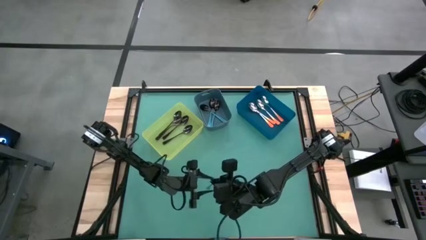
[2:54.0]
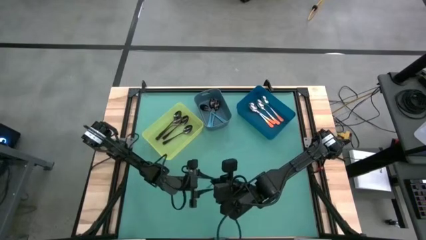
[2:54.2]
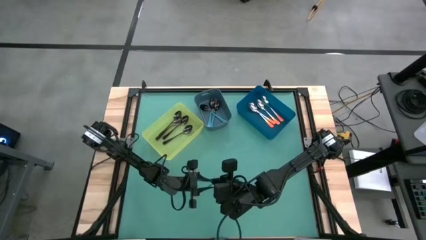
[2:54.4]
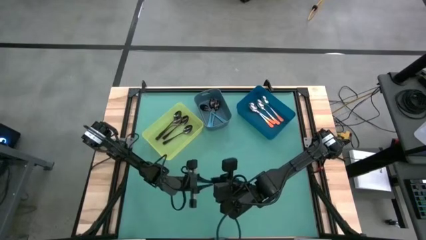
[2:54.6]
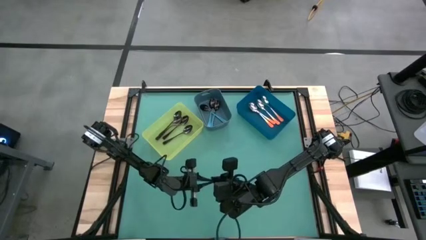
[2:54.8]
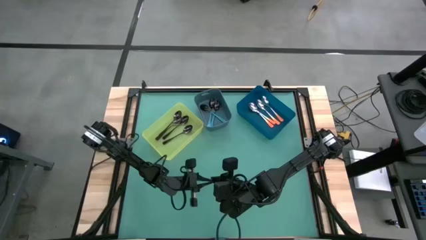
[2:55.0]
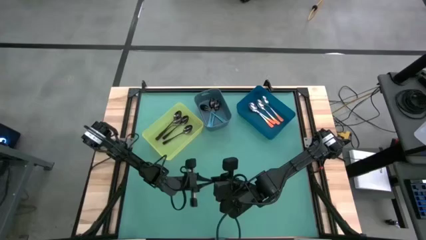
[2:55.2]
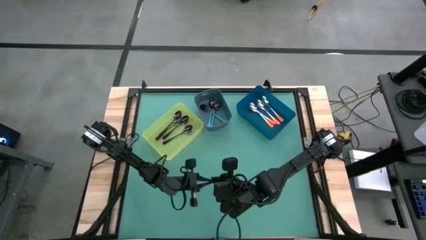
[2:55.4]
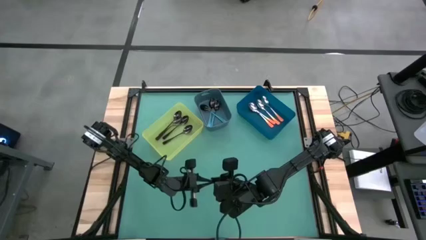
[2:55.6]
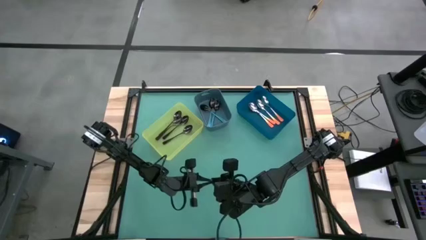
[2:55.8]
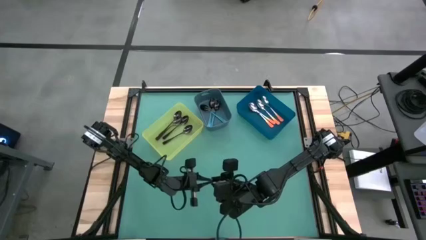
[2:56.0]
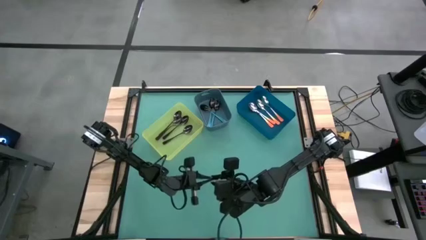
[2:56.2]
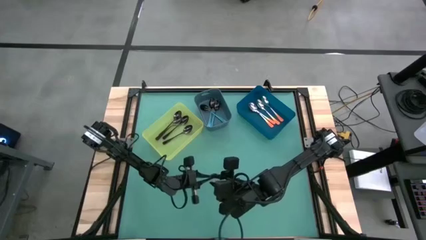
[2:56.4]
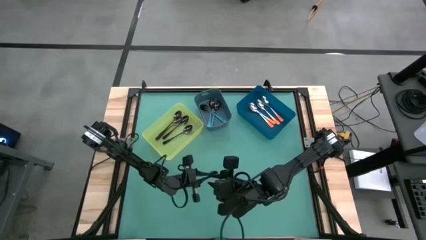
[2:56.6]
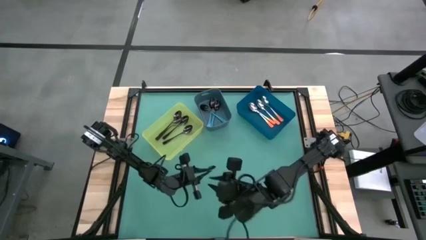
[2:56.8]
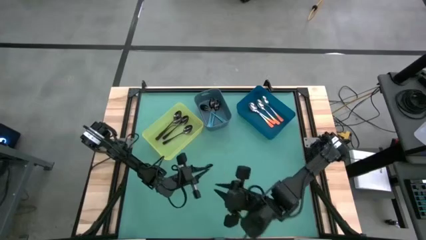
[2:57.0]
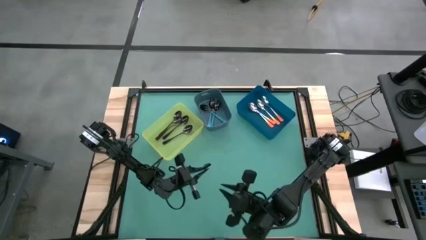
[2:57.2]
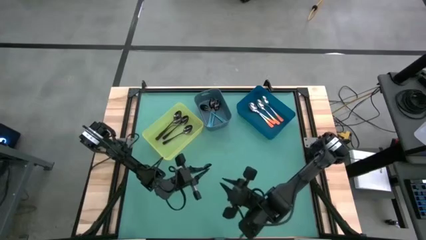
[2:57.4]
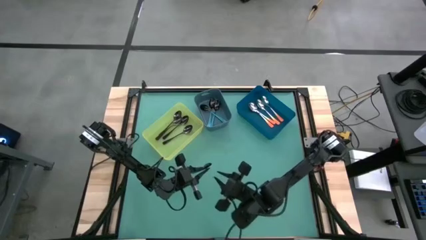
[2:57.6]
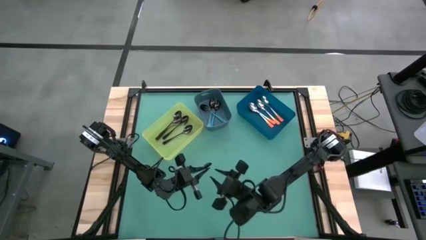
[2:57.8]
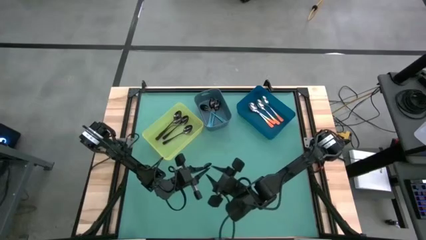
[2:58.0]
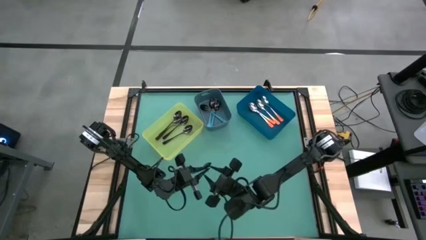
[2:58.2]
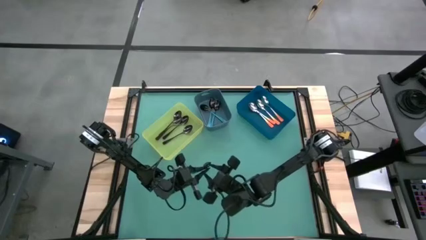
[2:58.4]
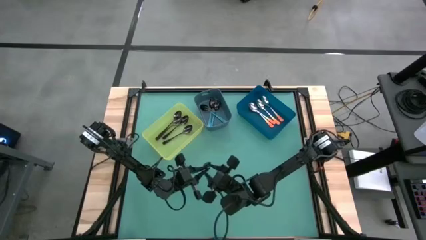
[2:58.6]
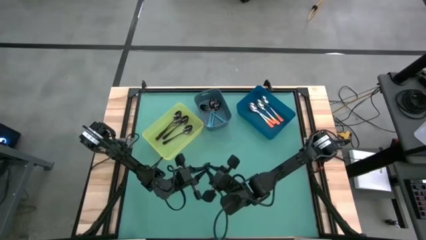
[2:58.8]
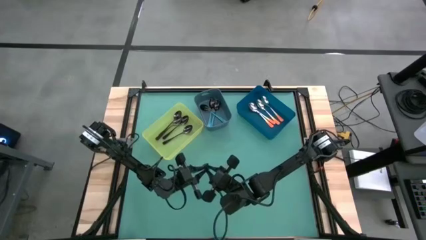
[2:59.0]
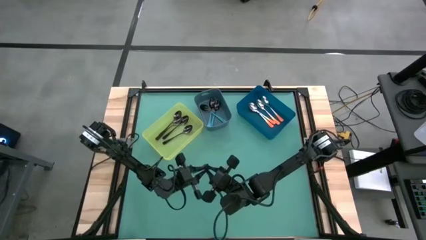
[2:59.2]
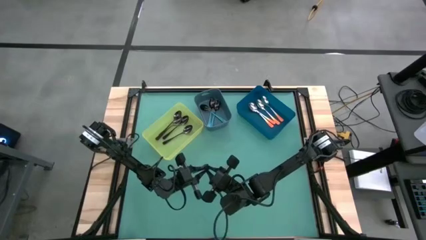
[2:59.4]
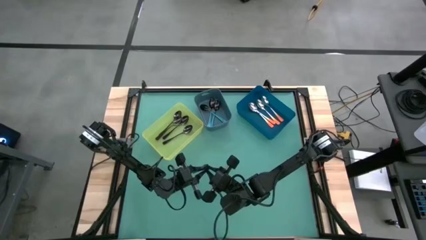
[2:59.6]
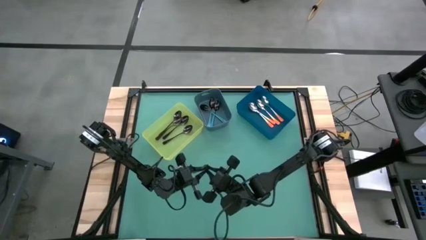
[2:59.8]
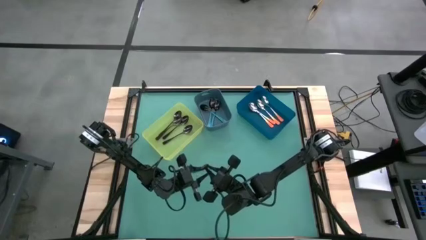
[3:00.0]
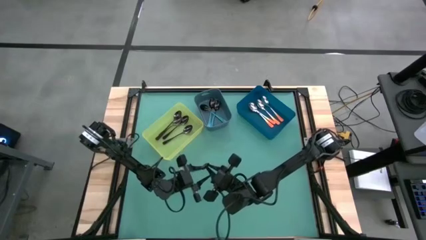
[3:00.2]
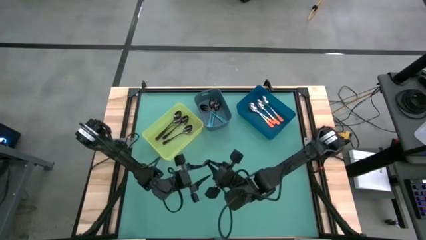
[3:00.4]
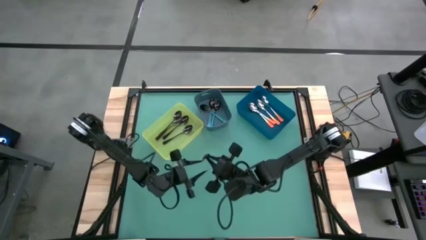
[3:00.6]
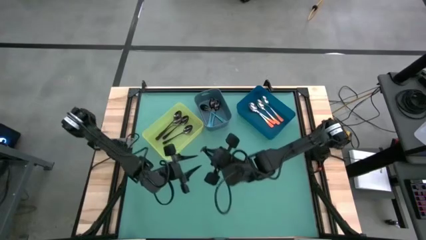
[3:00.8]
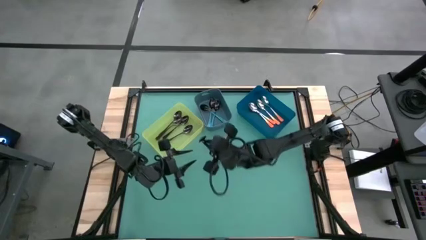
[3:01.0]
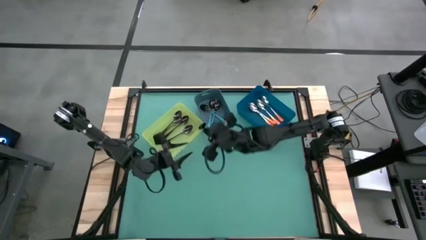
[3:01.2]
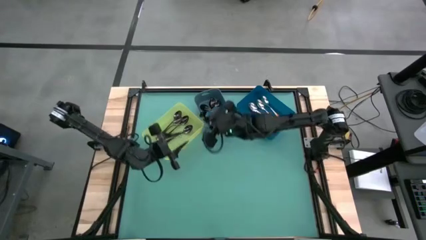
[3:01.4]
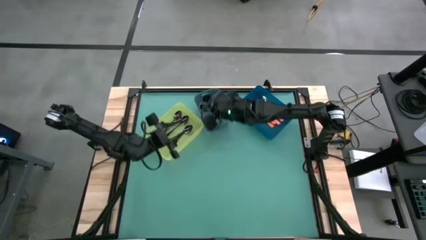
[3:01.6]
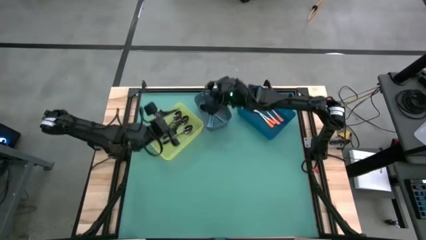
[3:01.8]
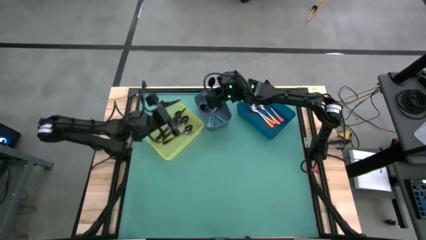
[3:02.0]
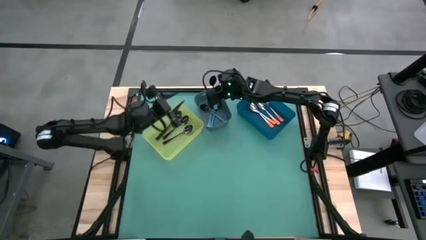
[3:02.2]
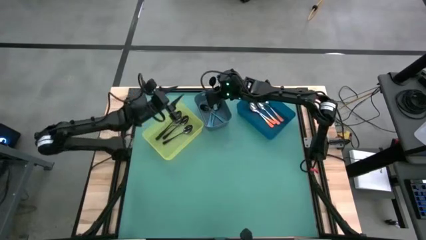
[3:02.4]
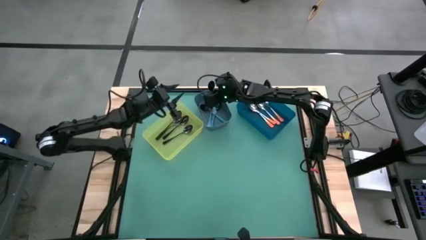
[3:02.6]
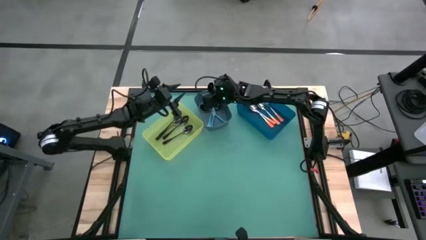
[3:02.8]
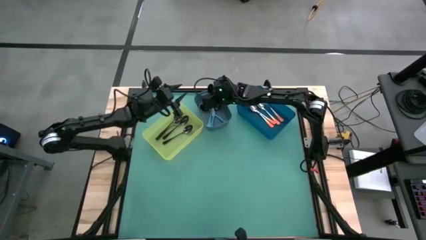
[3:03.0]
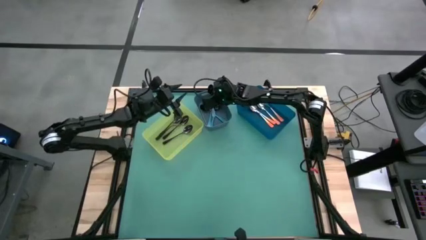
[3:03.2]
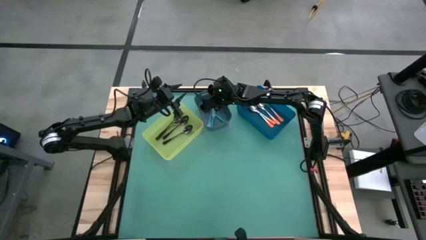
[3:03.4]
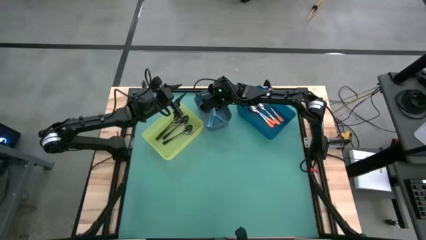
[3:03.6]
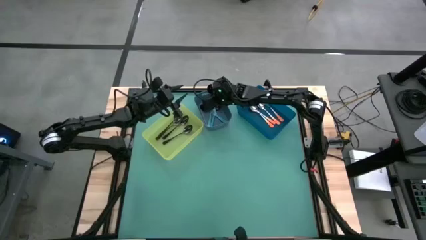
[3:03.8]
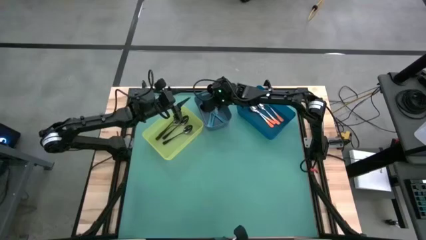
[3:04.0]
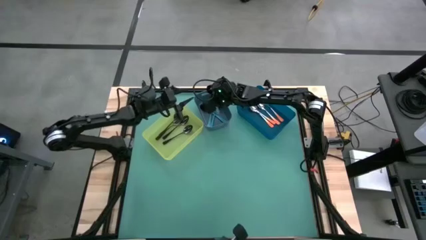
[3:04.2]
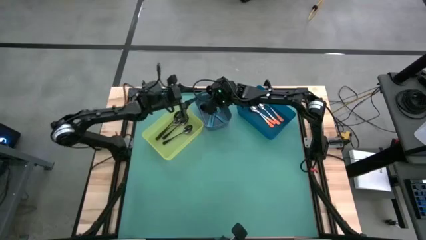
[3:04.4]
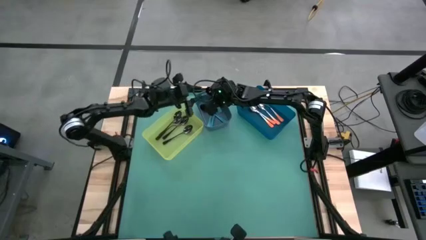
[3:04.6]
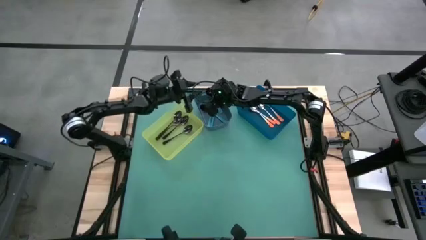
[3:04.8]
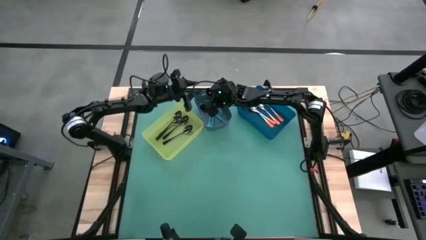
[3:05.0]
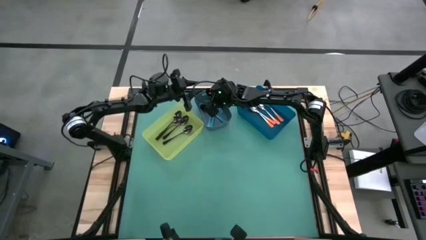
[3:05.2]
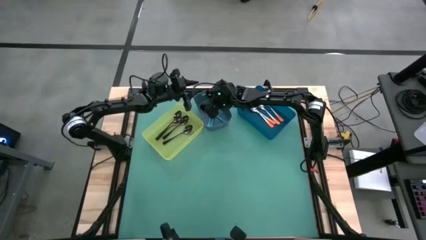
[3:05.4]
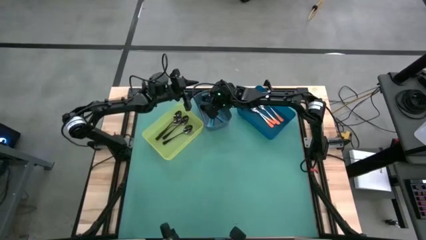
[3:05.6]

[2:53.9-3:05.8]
Task: Sort silverware by color (type)
Put the blue spoon into the dark blue bin

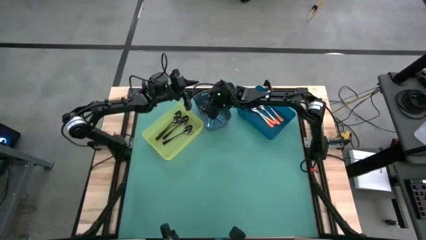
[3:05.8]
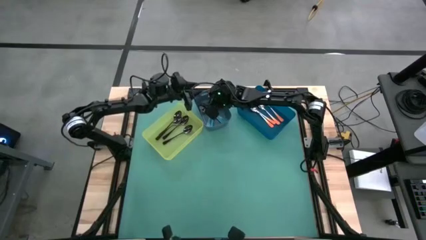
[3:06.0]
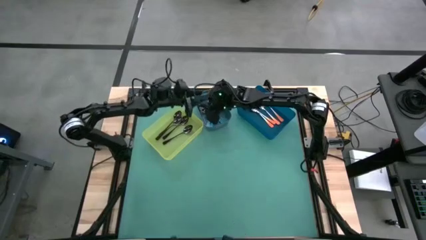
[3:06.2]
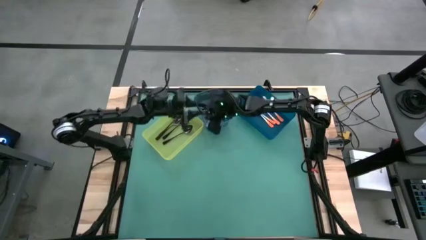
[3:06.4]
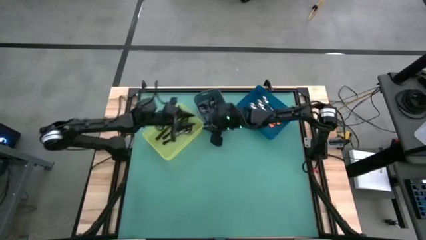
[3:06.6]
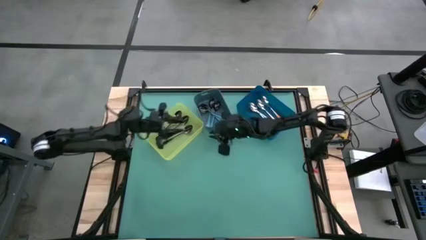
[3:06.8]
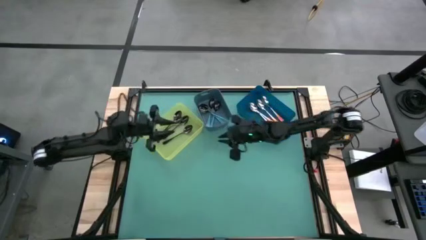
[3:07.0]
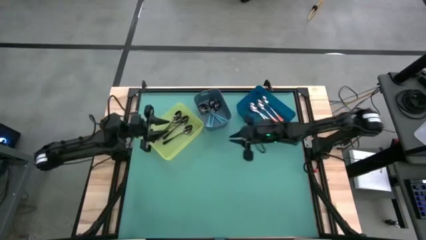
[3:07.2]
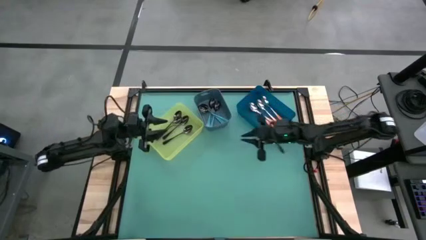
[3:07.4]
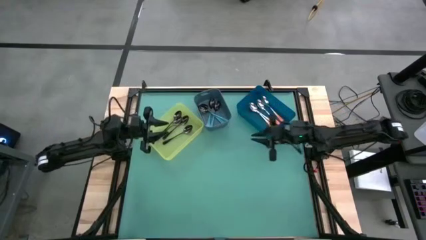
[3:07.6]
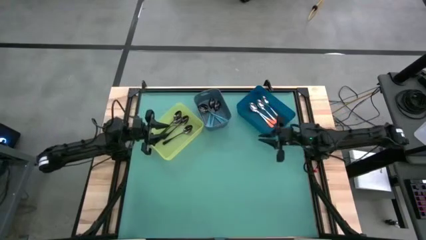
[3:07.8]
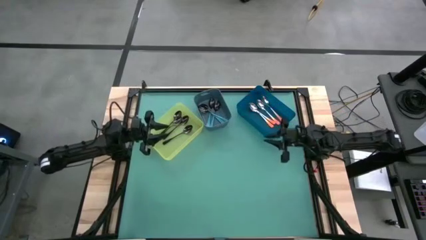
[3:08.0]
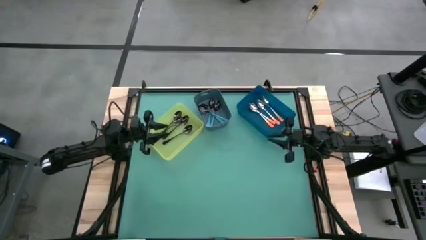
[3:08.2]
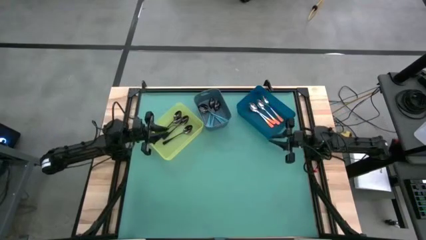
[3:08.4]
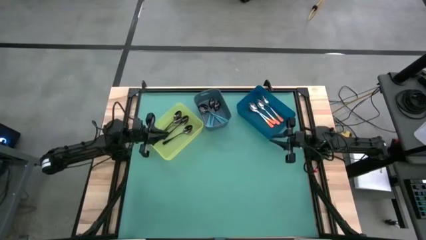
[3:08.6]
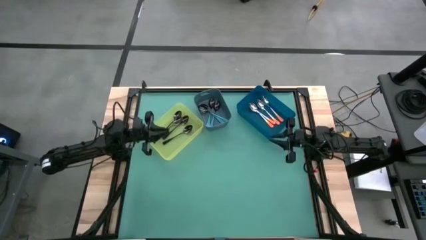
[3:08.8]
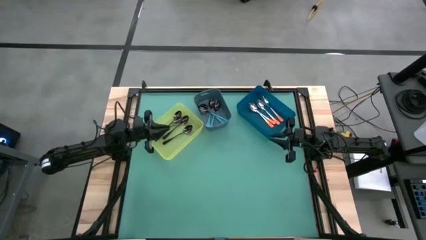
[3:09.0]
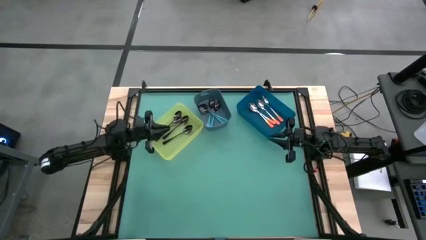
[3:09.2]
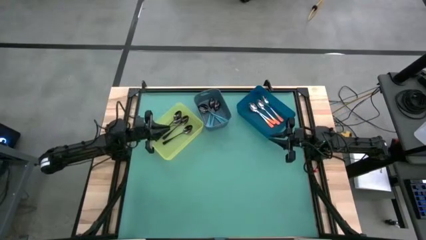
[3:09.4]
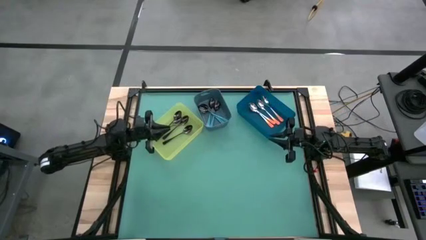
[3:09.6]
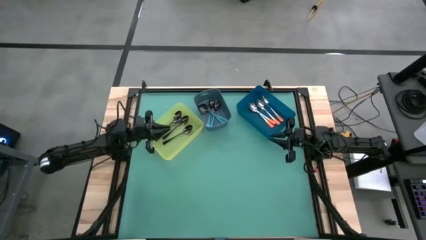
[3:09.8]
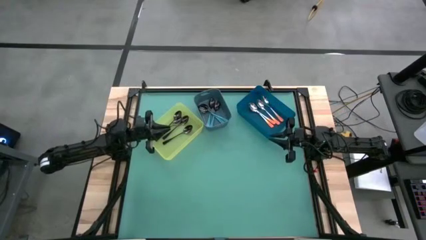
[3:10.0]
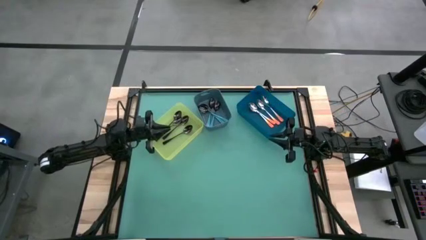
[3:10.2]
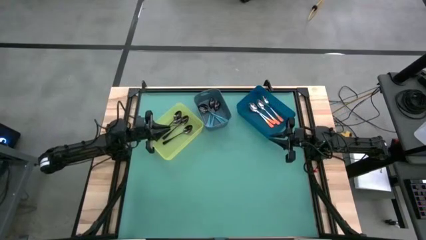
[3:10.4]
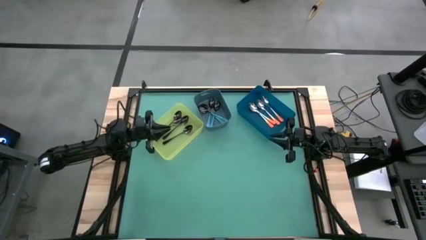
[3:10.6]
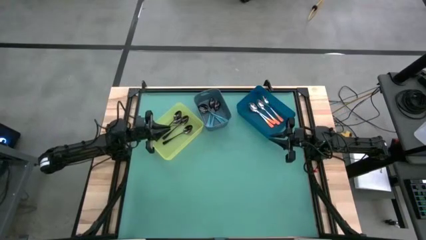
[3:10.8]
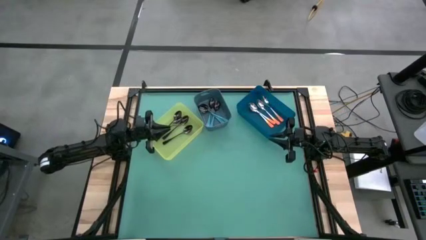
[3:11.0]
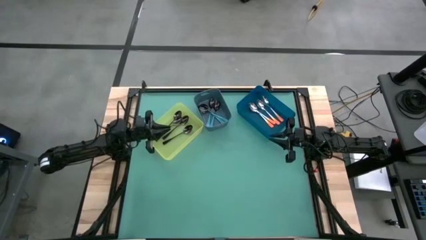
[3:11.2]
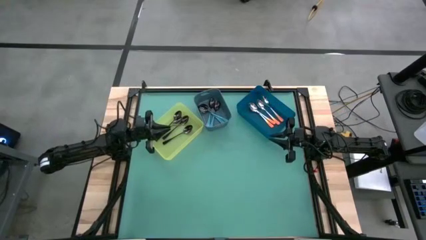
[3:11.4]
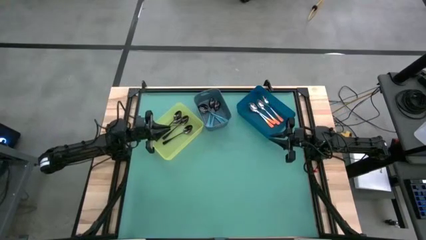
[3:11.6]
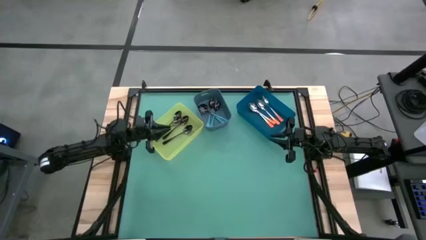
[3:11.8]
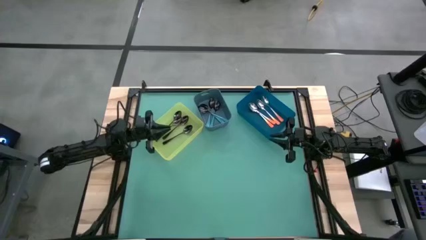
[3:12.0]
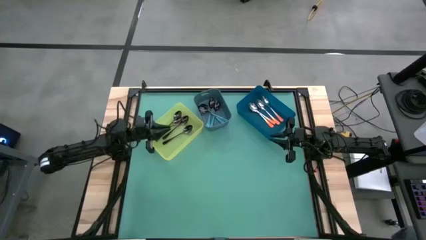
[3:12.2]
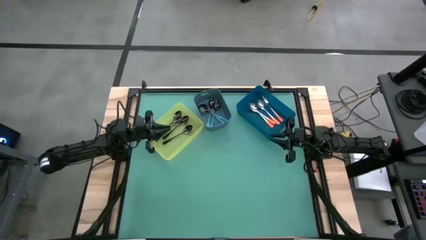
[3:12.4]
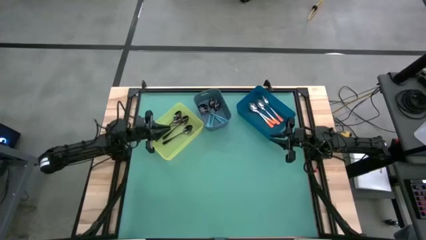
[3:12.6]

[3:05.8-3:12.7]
Return to Home Position
